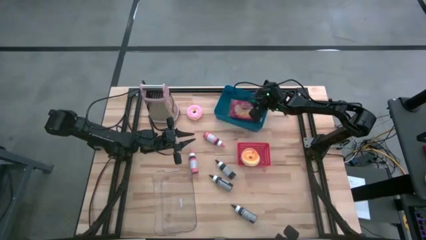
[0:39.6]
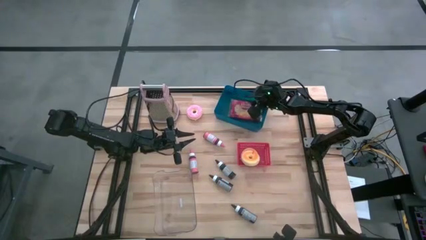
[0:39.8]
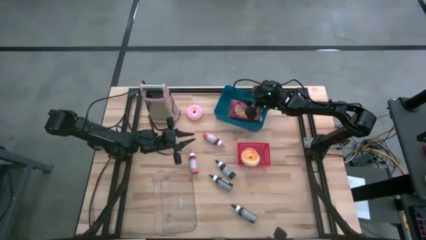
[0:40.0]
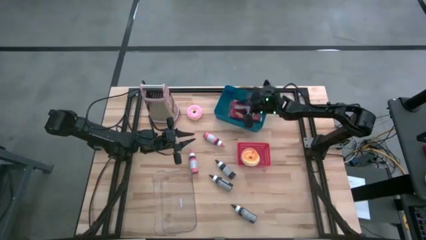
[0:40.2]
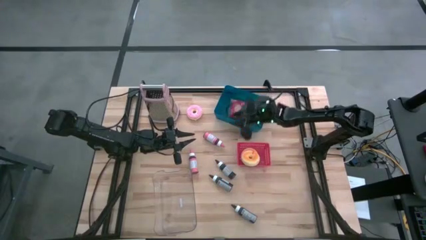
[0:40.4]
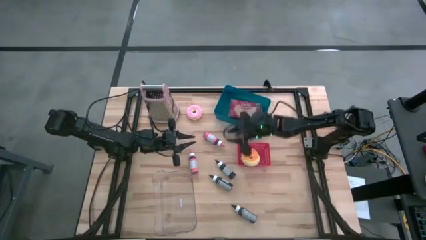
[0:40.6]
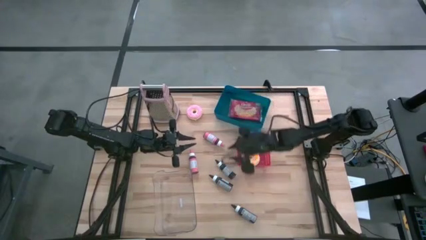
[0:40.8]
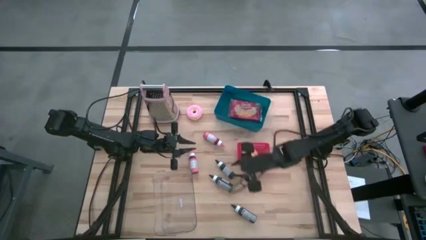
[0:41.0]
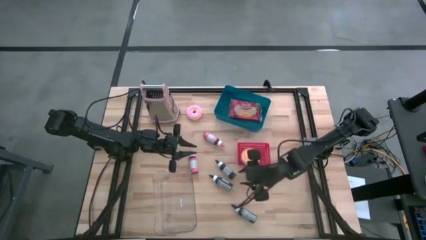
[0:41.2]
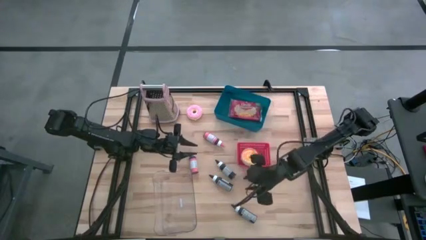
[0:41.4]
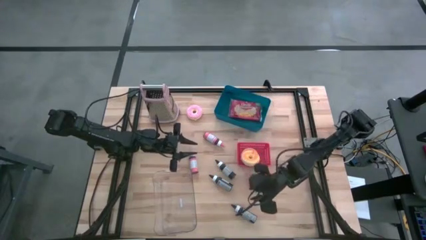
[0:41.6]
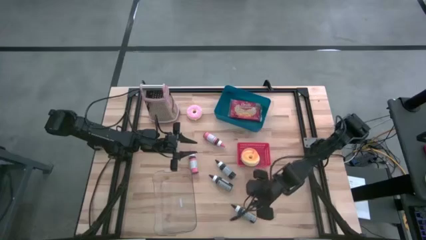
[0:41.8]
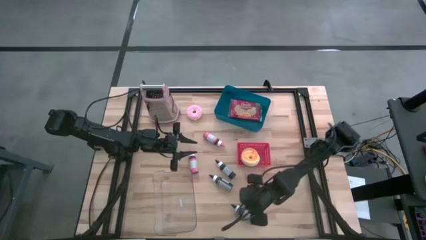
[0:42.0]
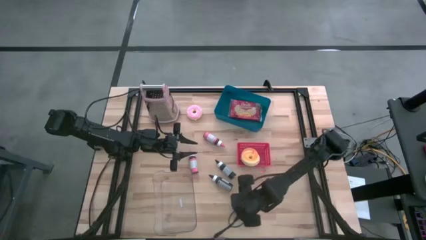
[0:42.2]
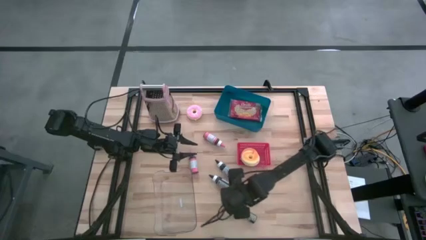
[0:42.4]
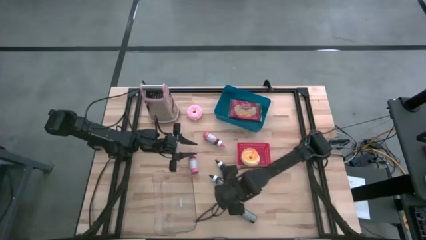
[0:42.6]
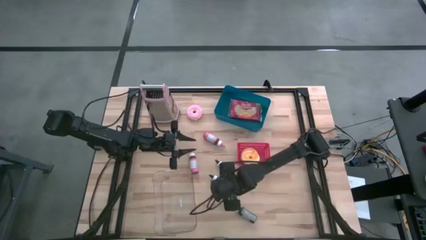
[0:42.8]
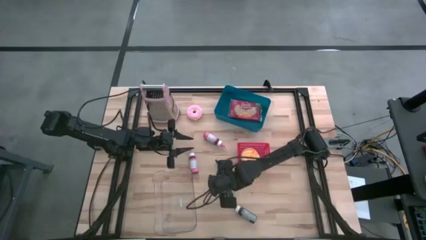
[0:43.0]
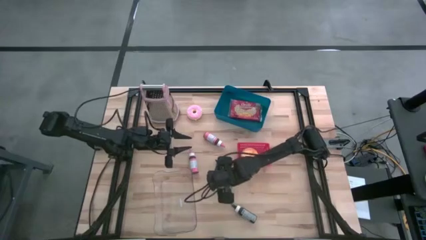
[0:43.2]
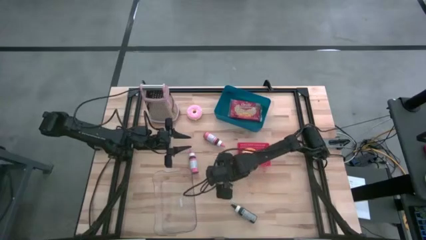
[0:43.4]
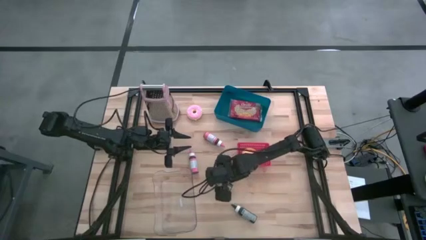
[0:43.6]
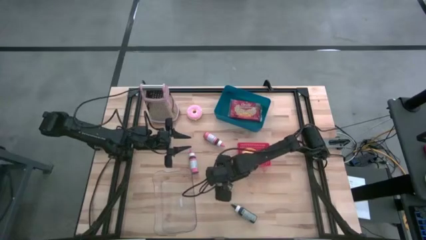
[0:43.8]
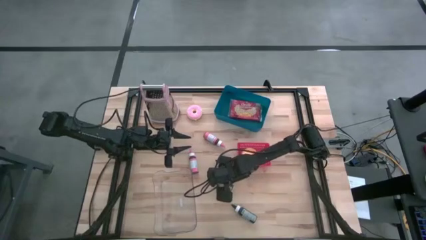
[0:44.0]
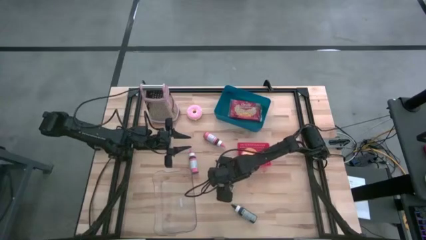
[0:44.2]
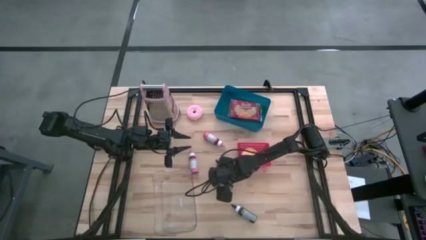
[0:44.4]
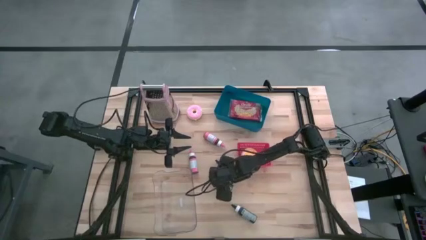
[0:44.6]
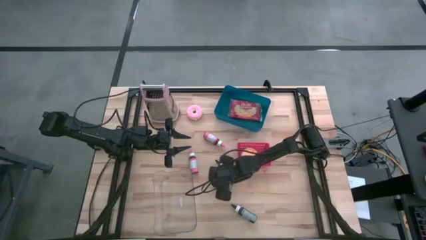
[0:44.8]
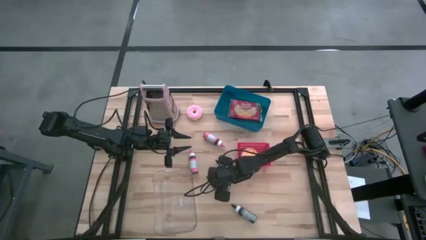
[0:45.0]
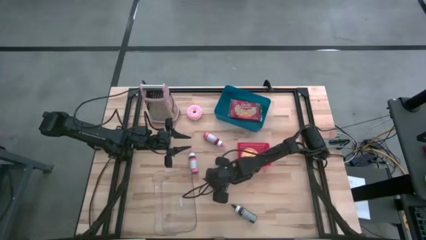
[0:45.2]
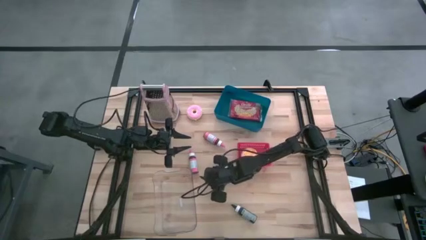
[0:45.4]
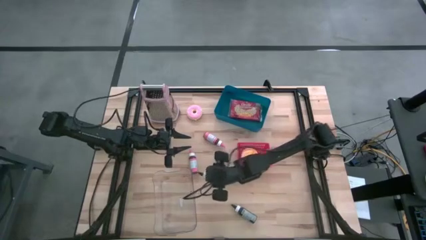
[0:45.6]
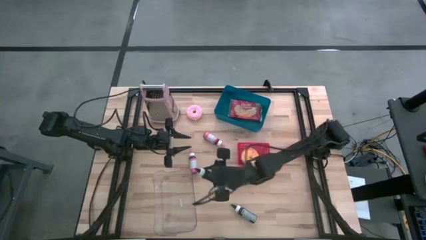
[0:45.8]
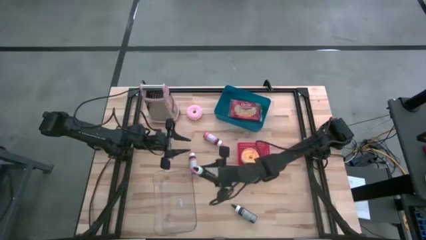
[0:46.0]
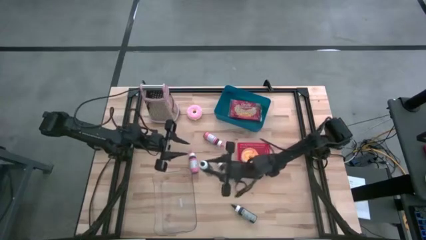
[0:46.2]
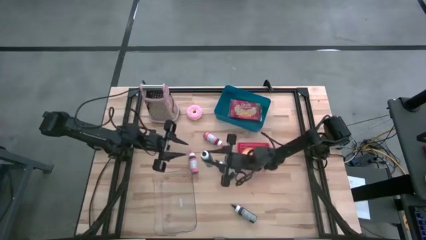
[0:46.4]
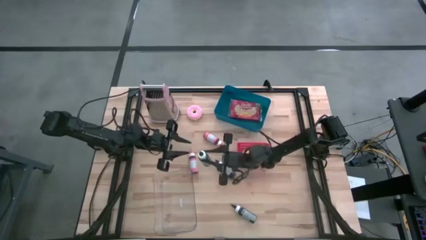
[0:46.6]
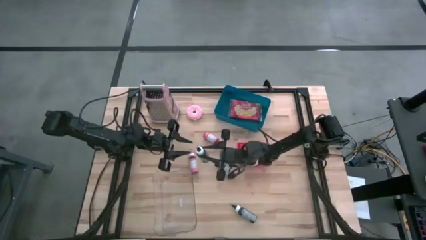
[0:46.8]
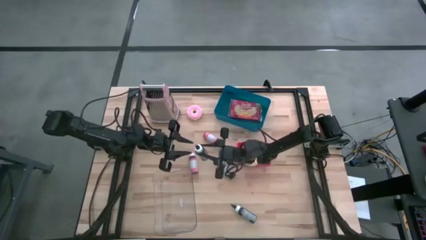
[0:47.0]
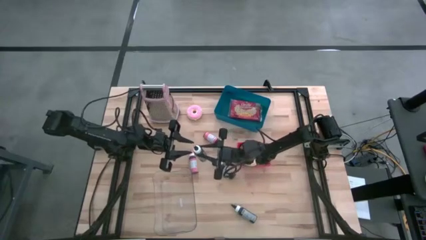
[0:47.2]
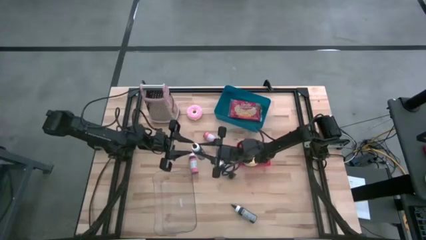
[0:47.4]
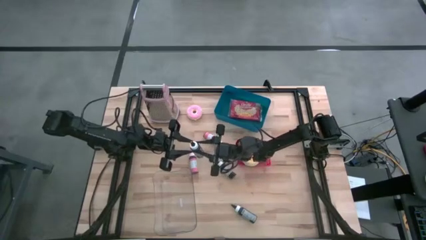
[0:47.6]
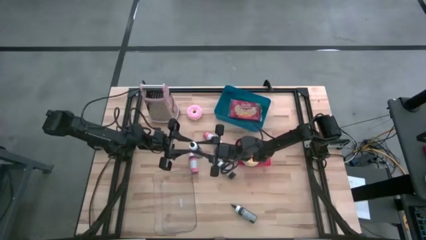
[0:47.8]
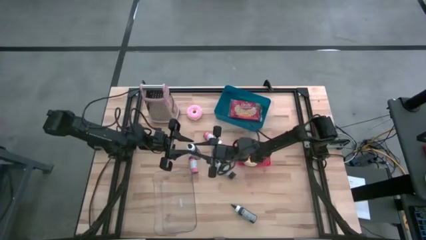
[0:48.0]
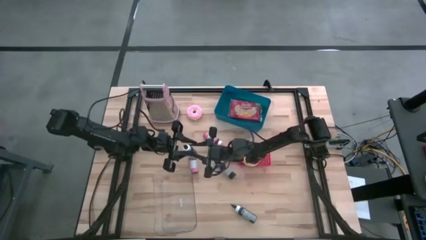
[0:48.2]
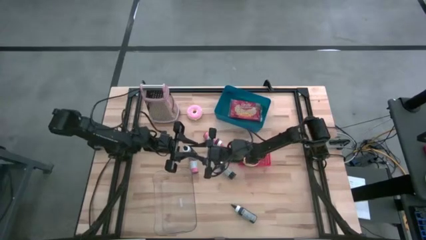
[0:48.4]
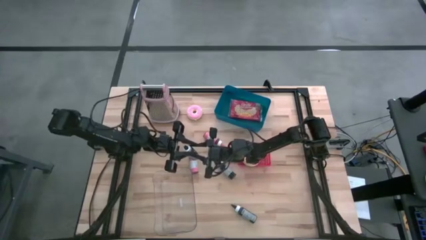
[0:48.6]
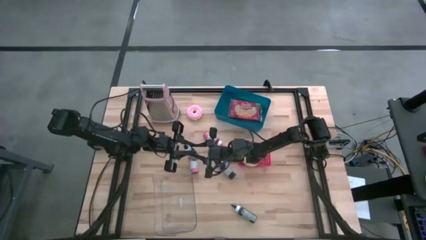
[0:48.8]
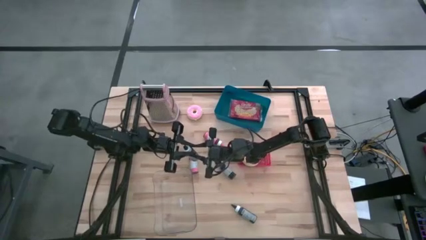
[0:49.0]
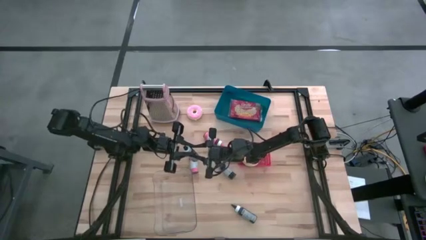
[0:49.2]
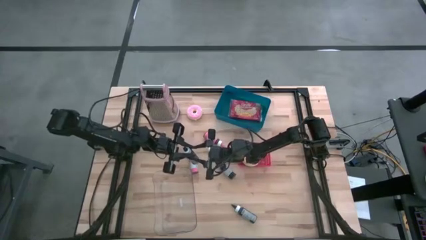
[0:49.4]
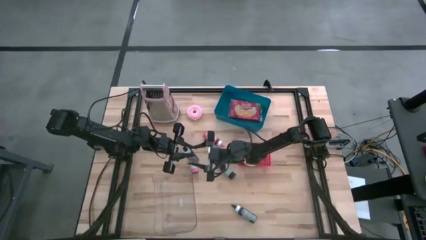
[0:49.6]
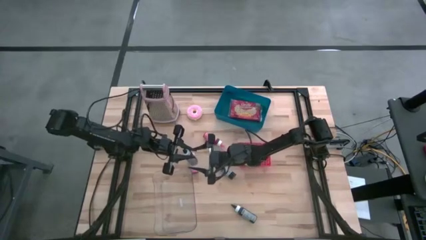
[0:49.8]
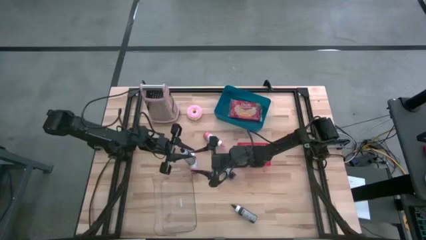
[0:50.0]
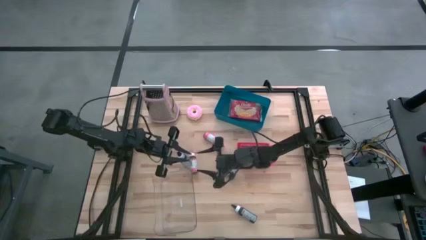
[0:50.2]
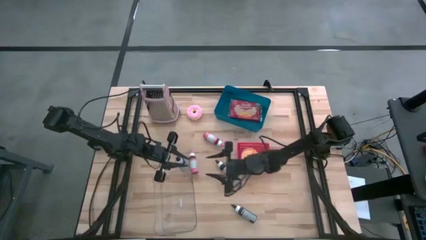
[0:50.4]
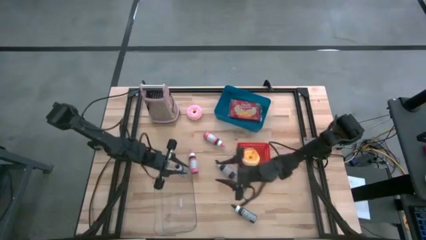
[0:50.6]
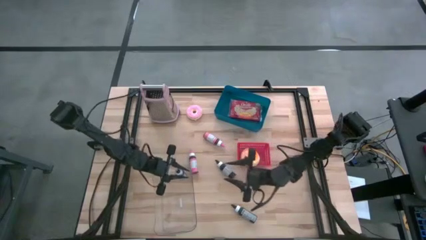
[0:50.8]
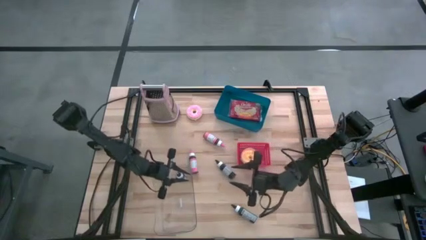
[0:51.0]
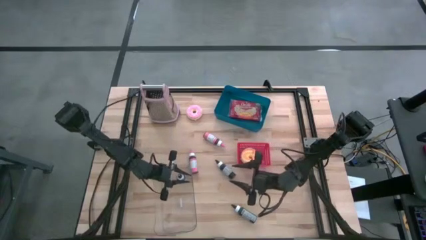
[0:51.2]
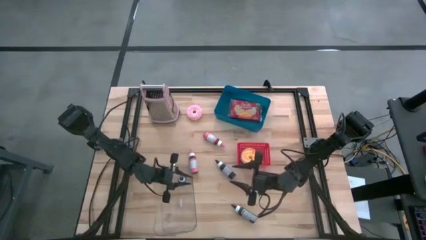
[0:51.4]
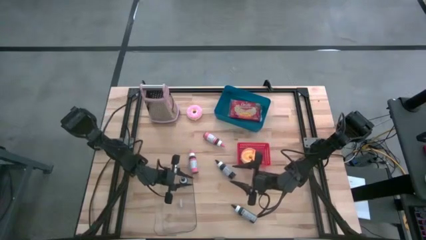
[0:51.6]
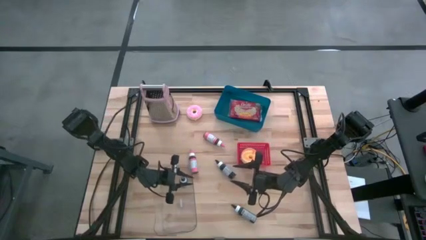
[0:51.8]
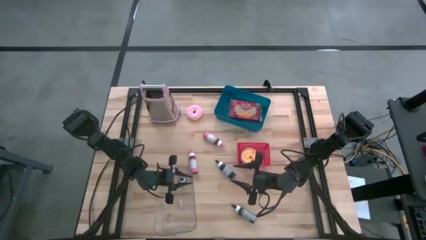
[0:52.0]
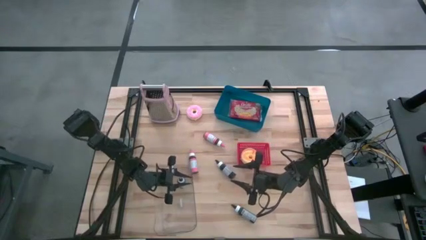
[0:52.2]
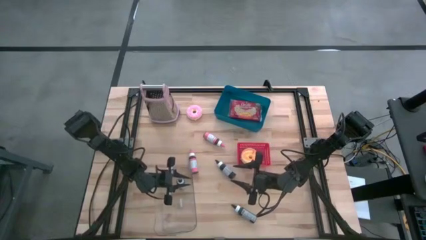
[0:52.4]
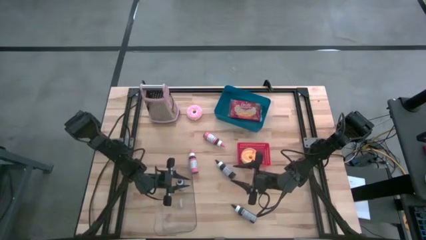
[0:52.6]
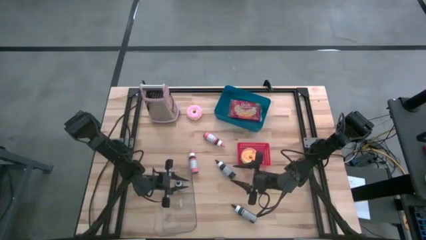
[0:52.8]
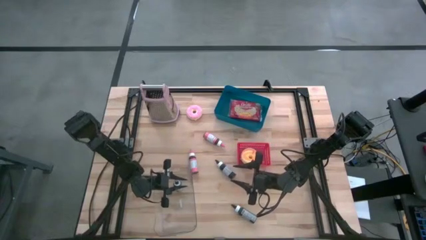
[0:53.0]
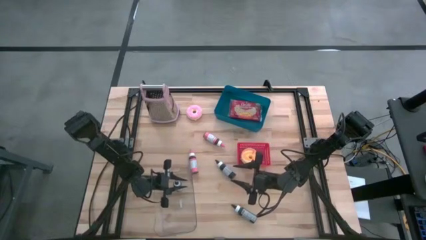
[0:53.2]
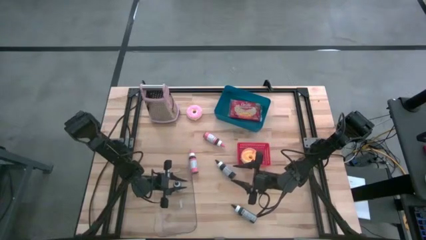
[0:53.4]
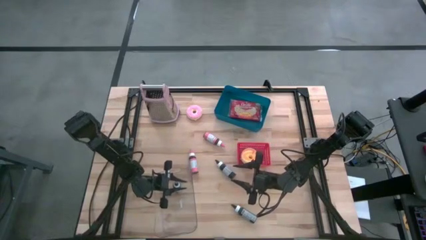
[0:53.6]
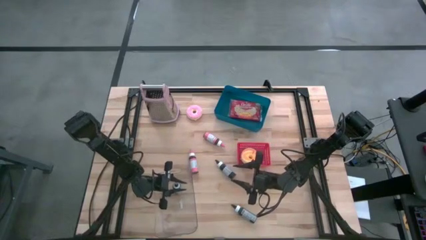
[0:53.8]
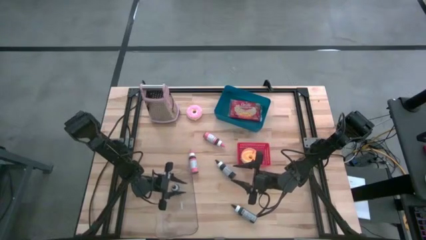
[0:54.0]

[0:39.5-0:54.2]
Task: Pick & Place Food Item
Put the middle black food coloring bottle into the transparent bin
